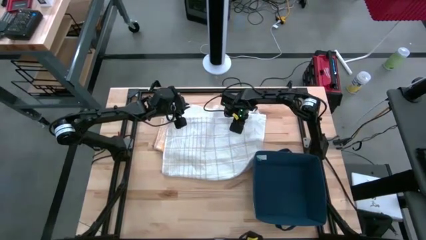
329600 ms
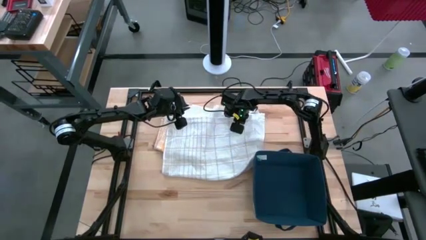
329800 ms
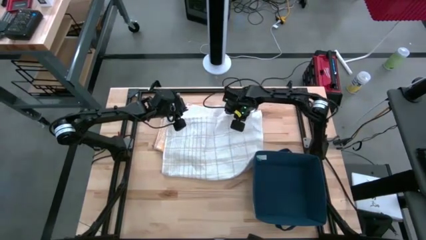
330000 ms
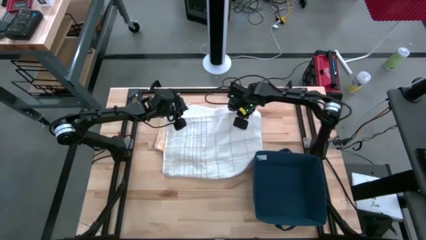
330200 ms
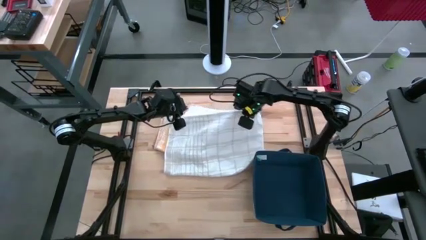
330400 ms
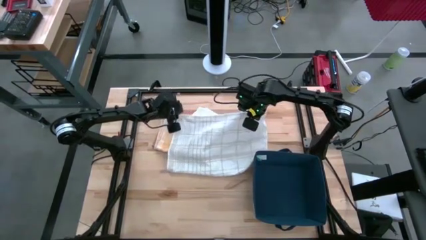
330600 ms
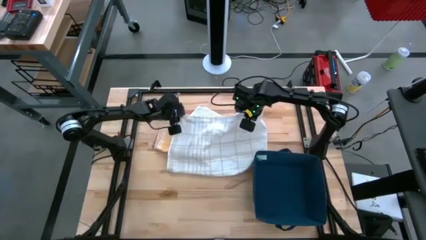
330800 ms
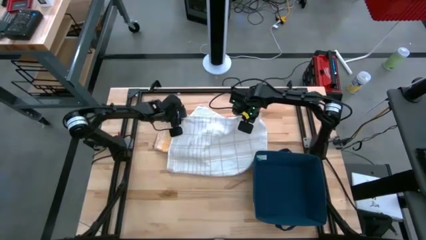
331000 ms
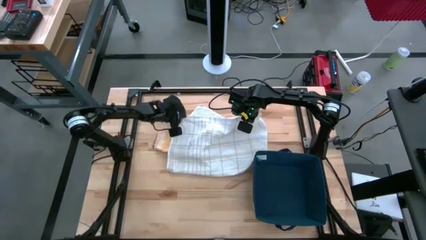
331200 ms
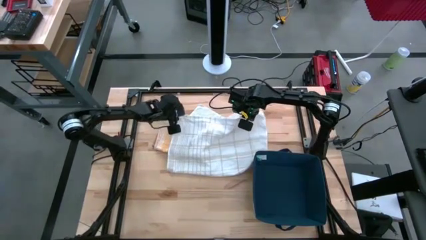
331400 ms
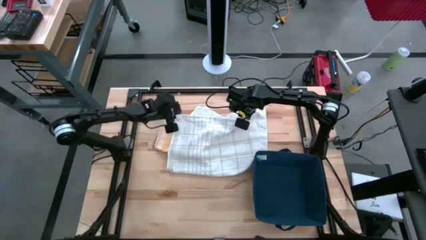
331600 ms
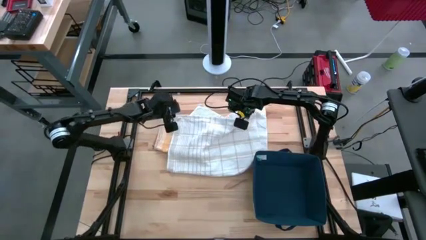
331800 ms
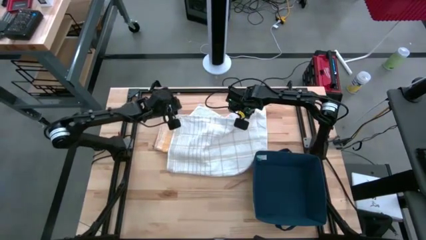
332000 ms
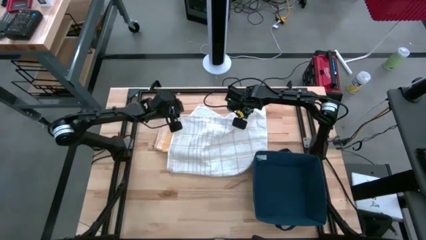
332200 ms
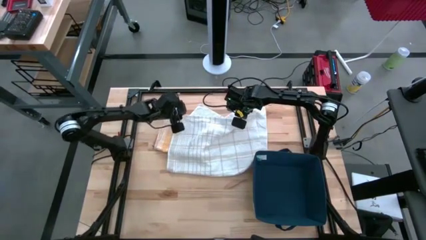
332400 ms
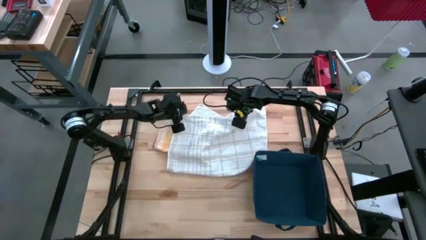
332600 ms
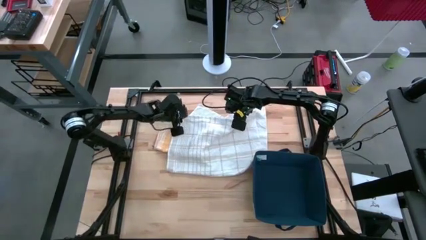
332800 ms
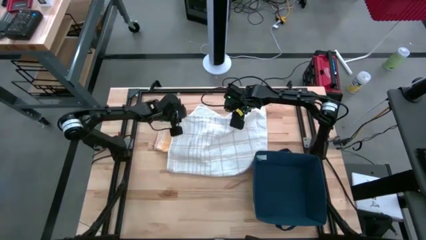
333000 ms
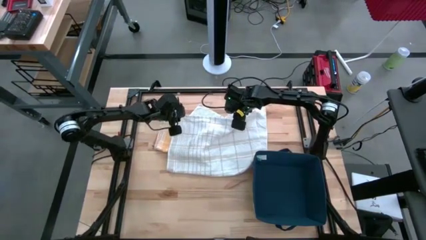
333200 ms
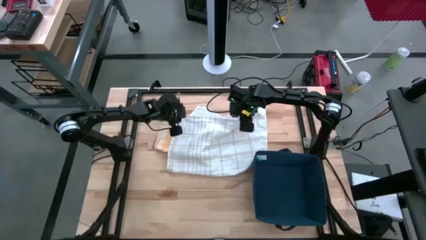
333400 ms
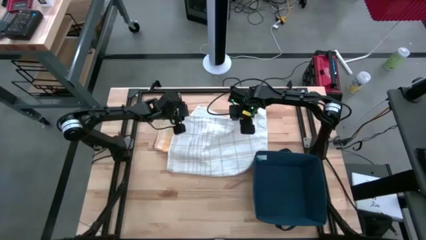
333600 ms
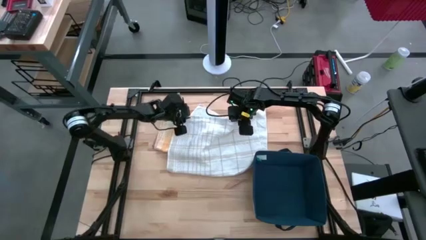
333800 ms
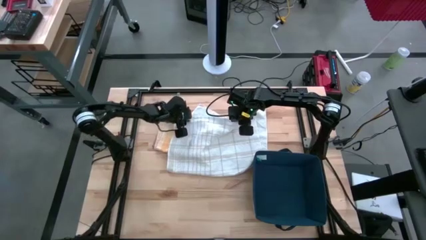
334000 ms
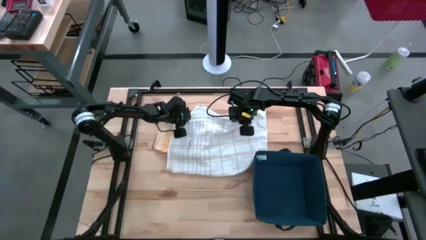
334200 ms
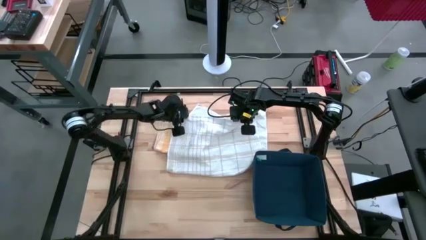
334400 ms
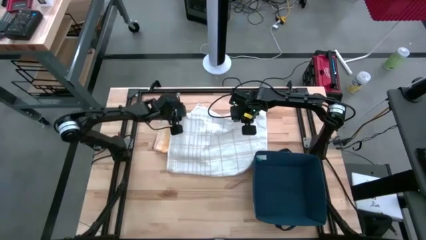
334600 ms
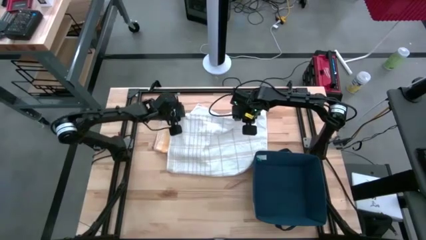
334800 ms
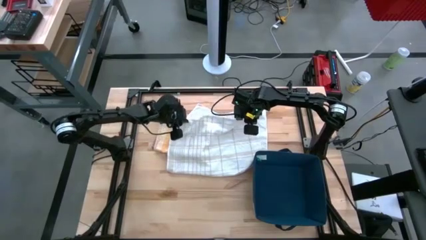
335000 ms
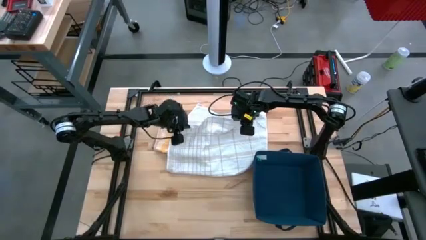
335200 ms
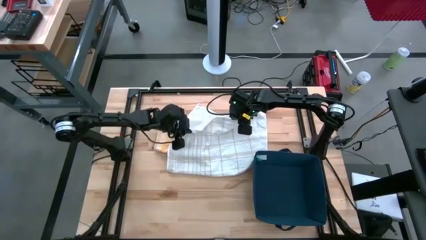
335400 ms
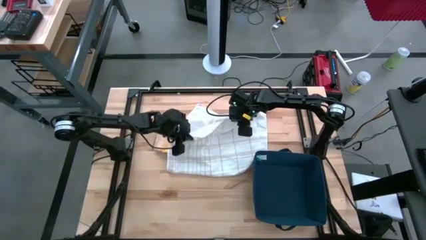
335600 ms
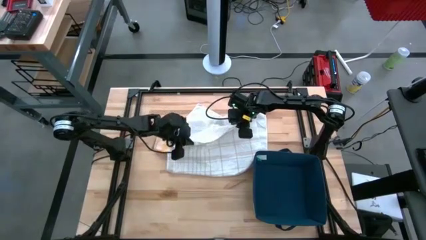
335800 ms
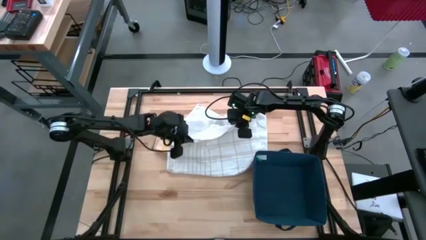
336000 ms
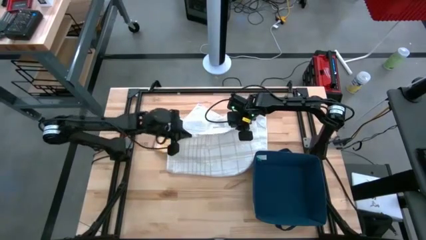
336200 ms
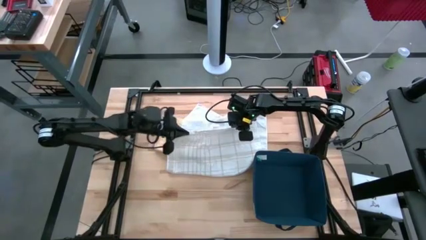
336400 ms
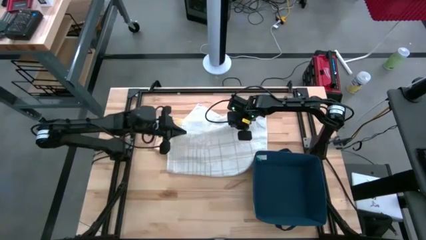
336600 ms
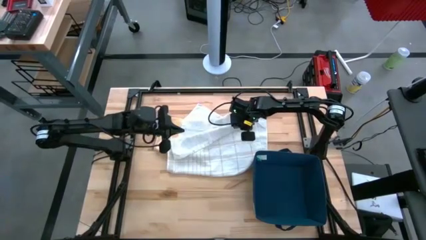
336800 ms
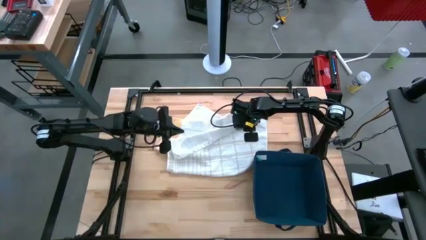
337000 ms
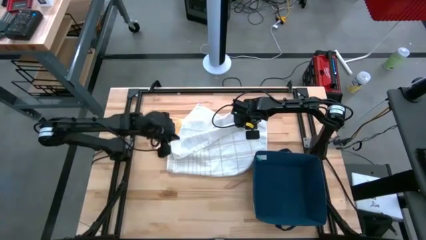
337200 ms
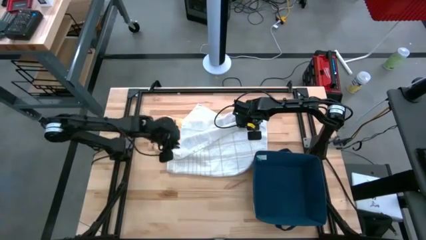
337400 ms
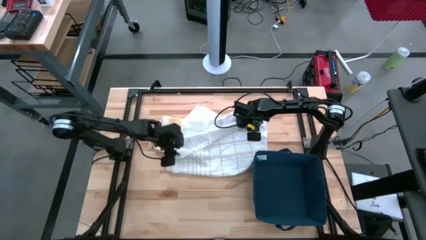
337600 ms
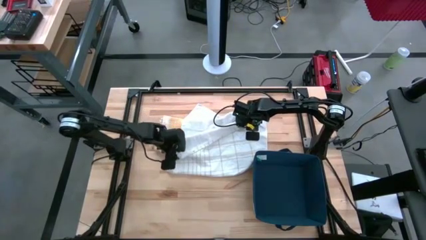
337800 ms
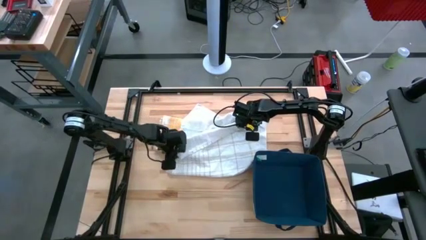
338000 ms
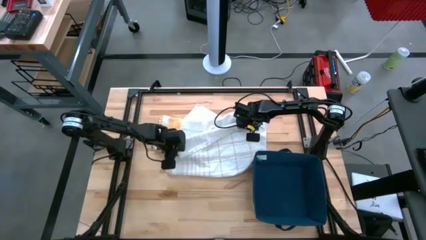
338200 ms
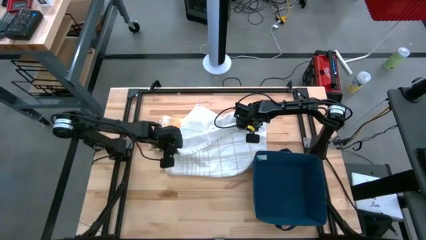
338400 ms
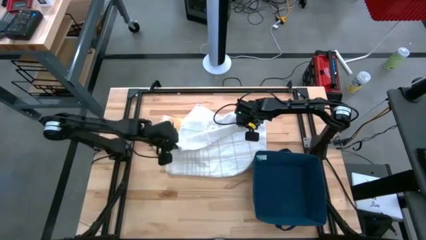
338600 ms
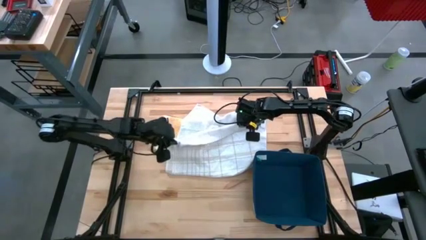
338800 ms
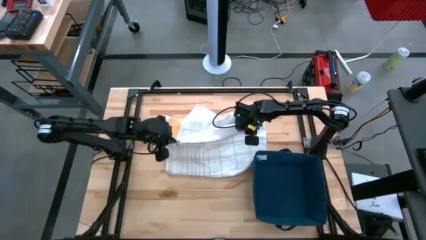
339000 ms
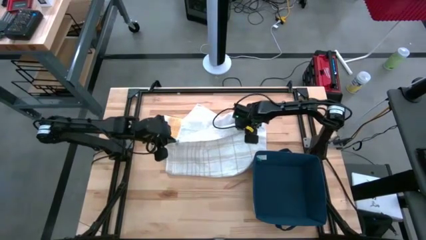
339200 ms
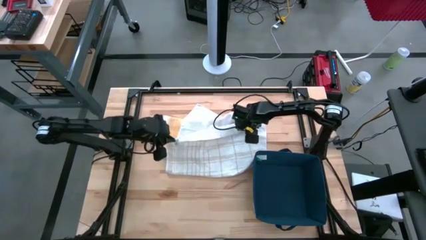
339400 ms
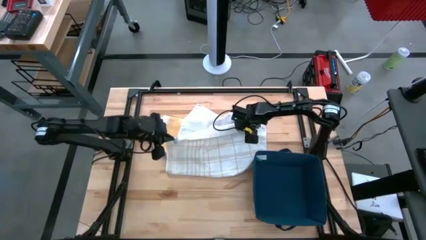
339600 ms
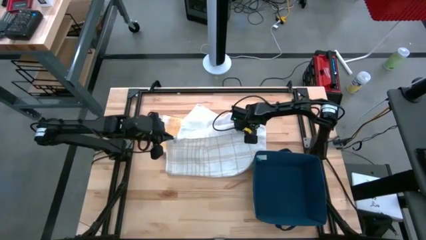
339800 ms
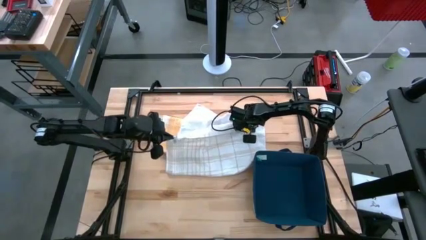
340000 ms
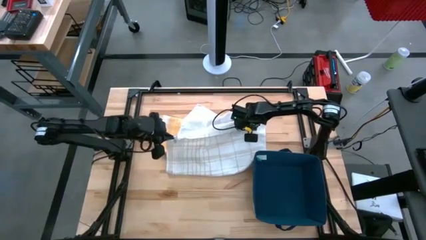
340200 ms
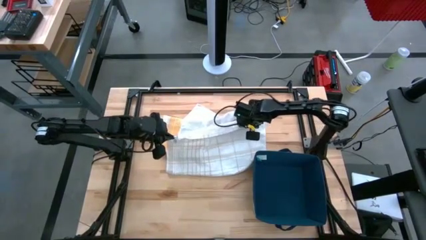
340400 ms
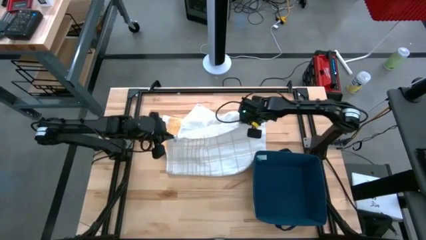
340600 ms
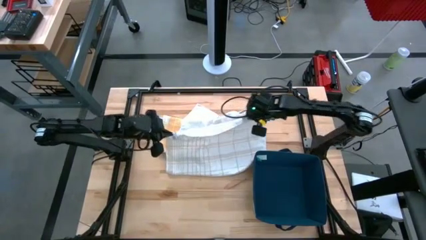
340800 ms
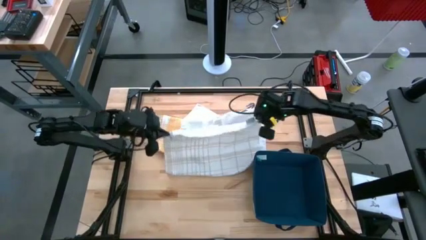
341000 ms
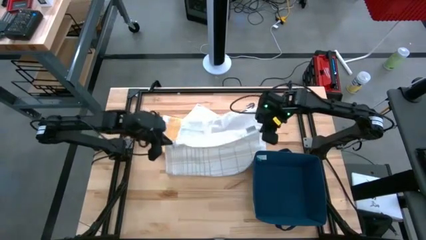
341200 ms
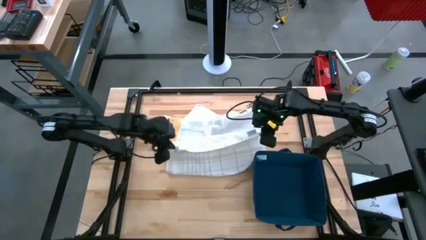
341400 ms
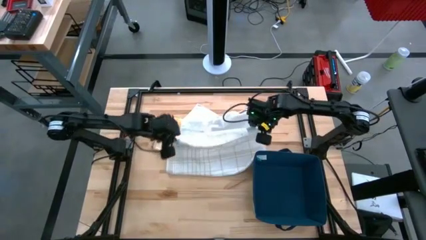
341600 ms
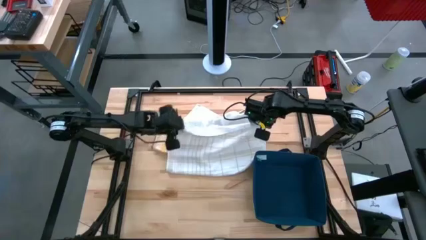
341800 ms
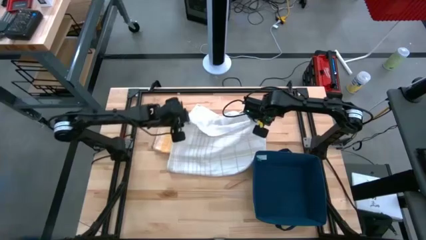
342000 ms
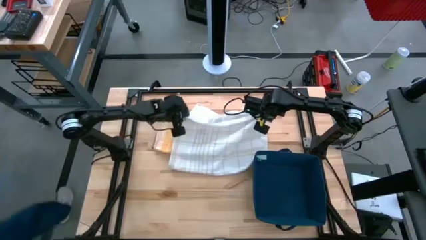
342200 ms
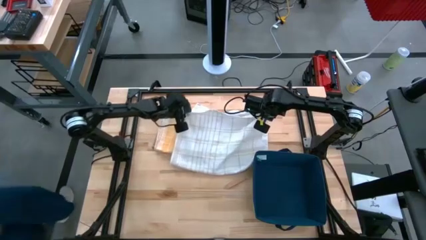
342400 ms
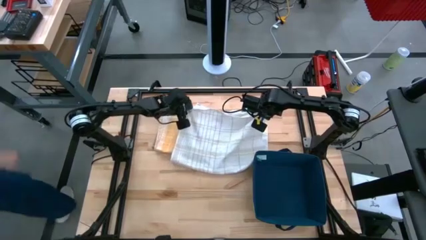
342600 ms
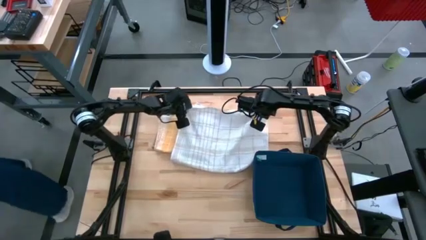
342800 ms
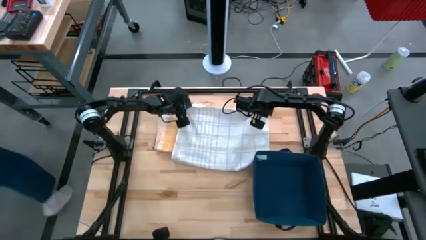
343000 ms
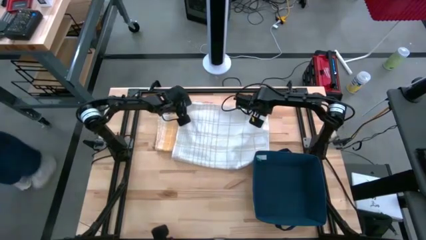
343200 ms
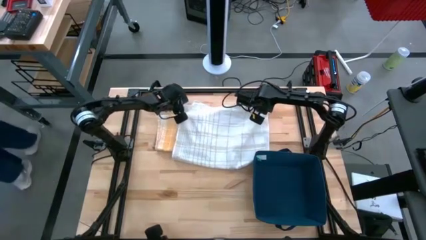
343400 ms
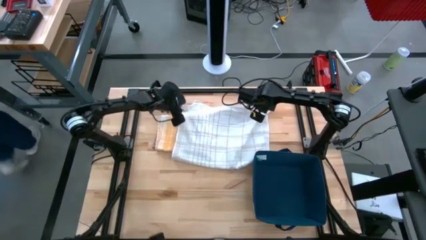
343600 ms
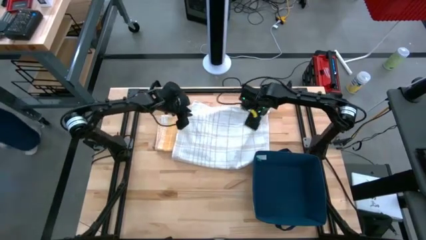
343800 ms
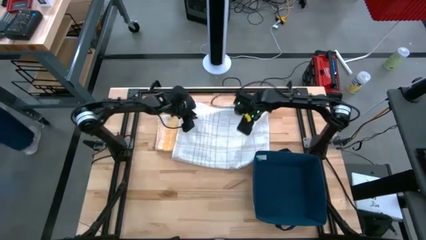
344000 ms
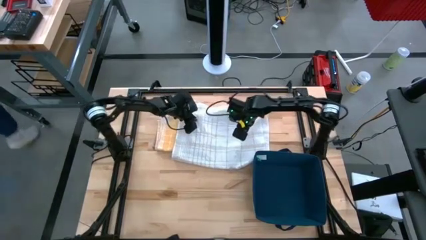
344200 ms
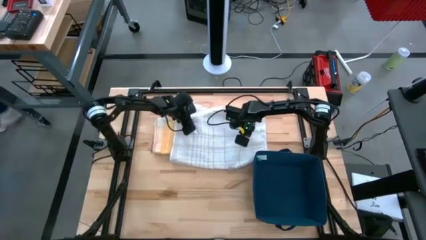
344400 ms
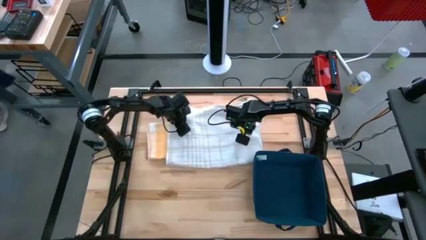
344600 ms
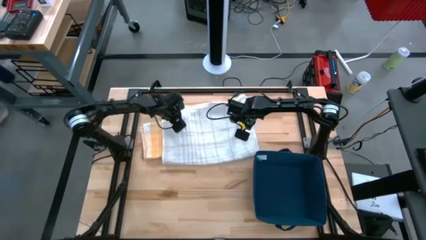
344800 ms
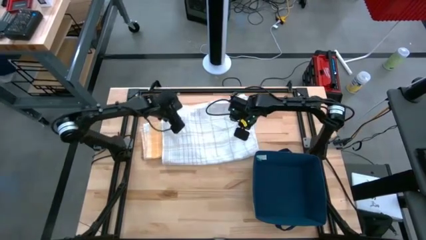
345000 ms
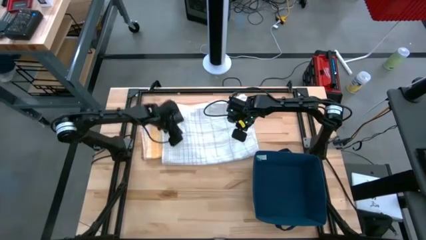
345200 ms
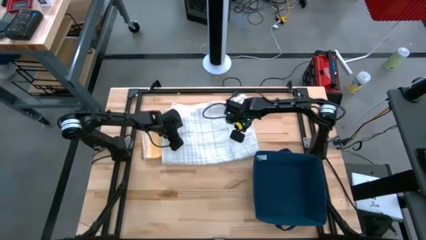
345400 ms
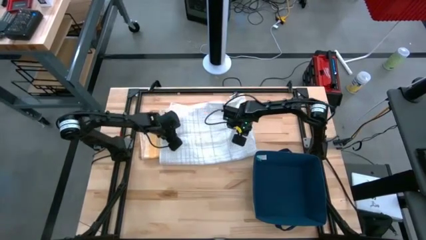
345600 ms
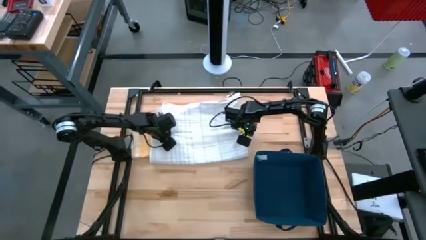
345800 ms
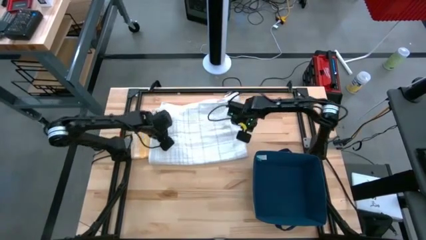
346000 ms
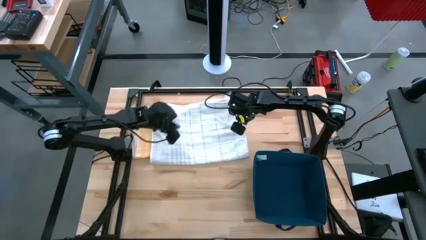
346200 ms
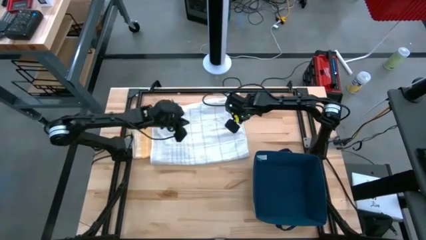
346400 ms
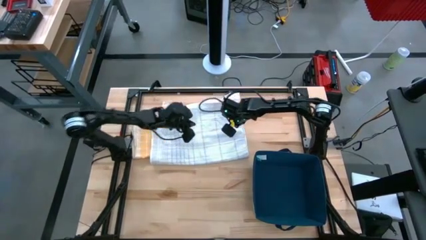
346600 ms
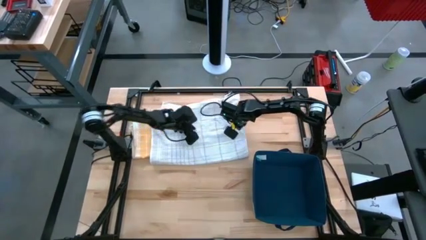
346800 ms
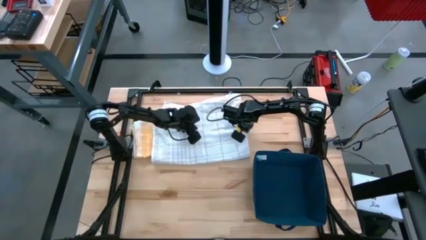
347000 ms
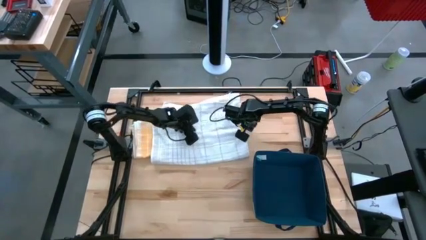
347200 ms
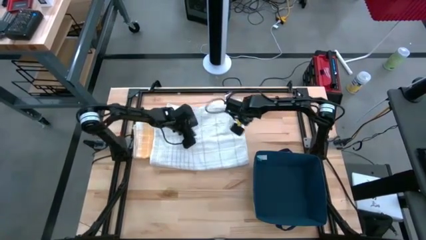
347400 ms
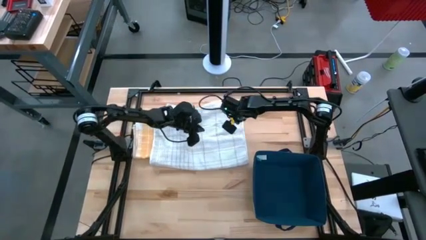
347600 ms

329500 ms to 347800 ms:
Task: Fold towel
Fold the white towel
